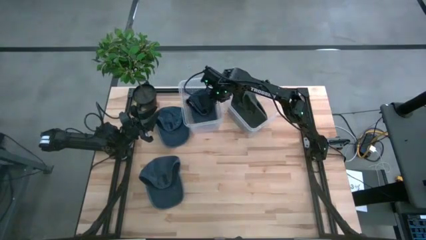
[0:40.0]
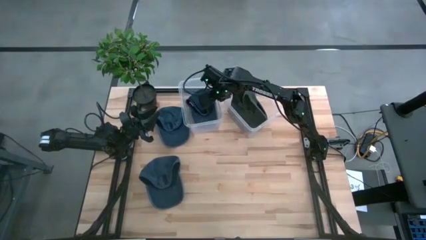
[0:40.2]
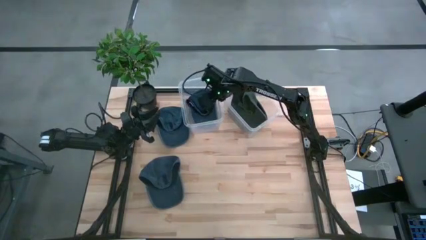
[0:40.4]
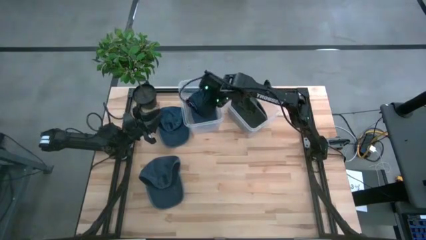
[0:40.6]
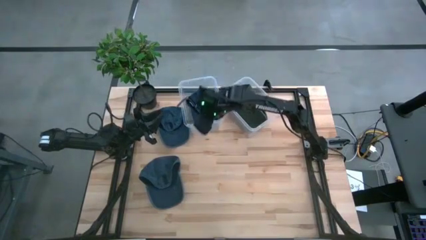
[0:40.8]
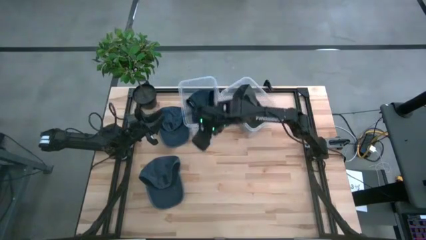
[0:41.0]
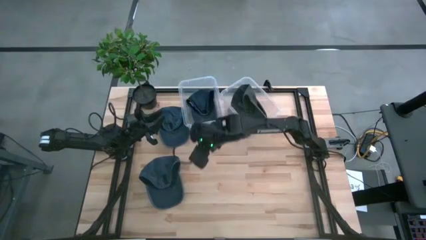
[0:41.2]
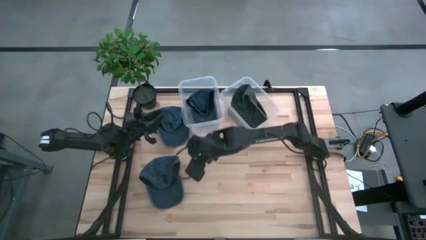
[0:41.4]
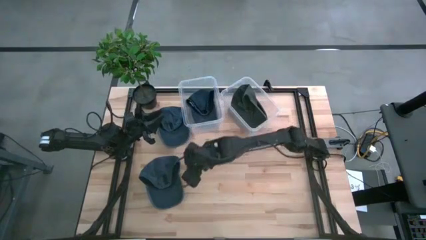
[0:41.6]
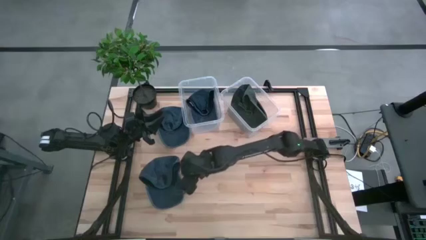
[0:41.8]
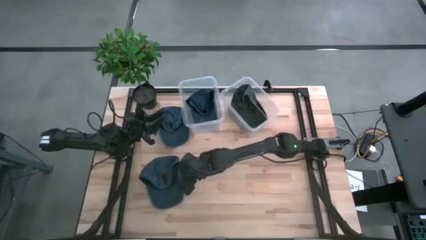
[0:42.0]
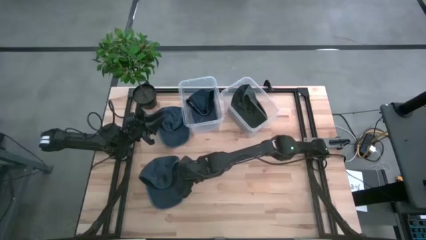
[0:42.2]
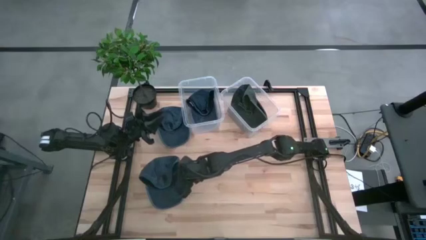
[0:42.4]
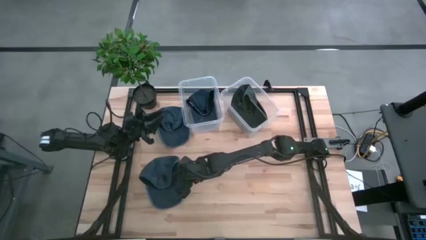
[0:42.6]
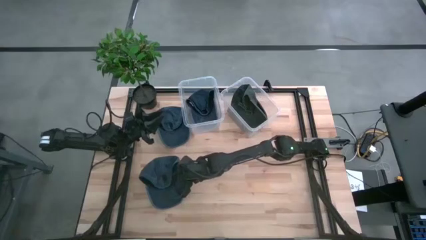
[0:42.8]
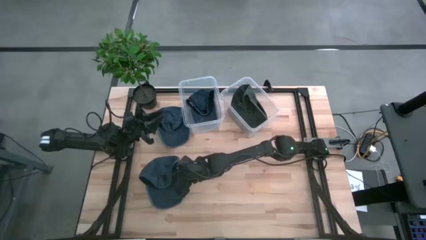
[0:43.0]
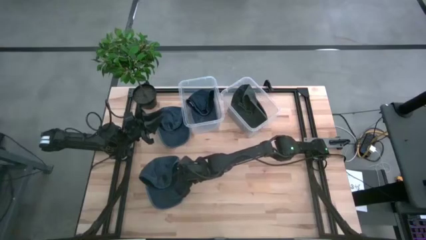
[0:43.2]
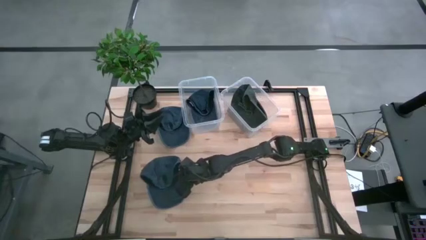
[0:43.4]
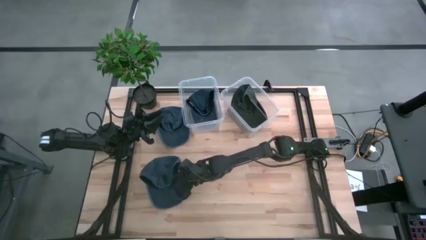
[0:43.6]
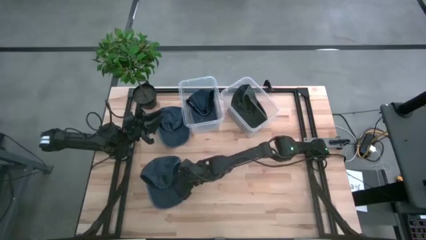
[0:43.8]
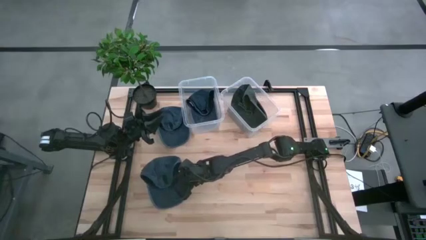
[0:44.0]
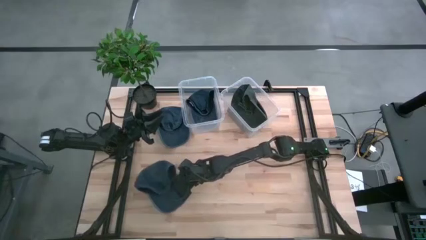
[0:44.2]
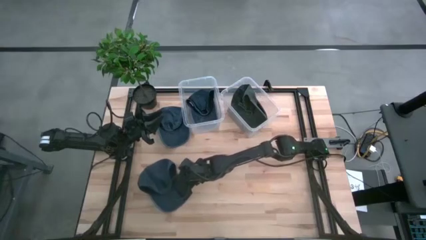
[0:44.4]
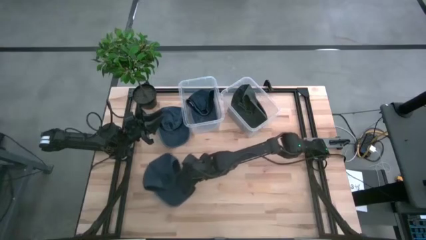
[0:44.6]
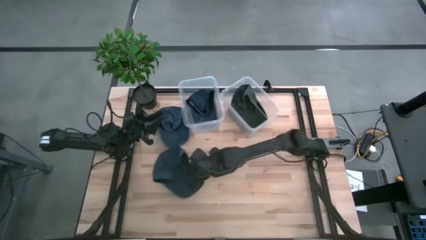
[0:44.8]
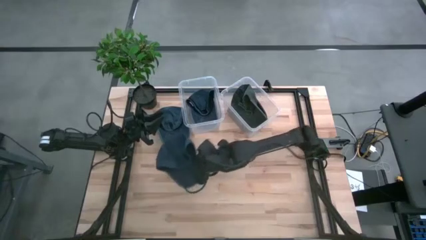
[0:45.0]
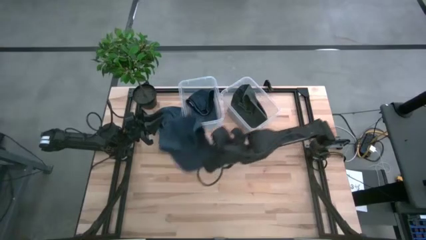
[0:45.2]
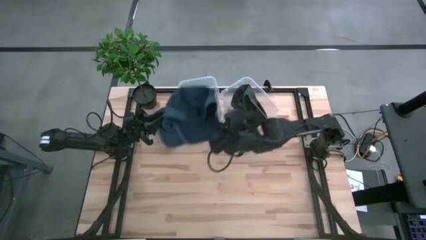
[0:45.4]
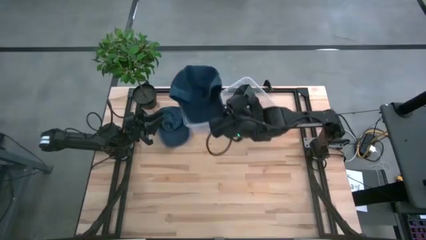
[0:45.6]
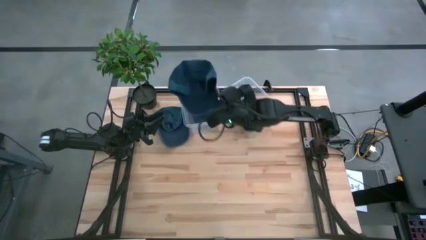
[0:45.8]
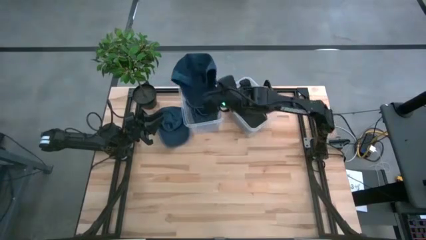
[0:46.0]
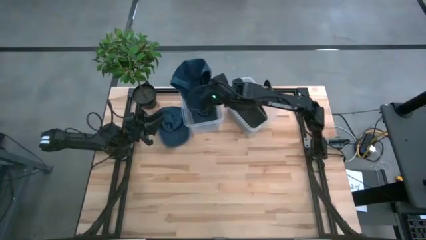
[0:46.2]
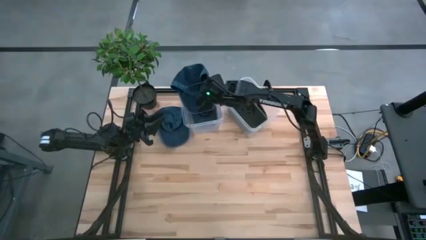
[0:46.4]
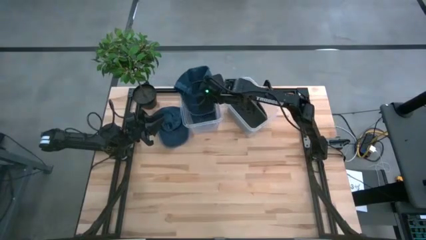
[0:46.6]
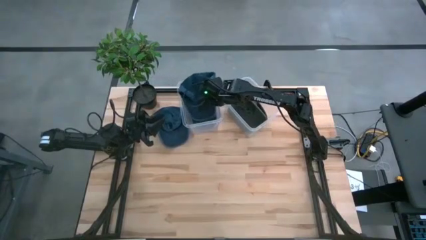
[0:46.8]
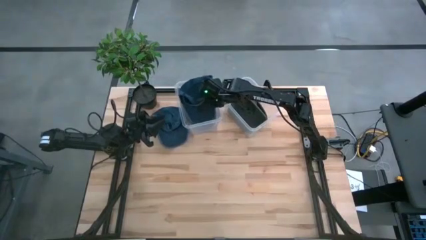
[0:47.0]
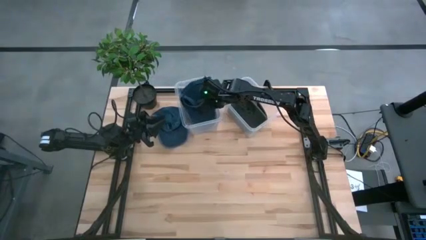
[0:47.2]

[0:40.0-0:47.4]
Task: Pick & Place hat
Put the bottom blue cap into the left transparent bin

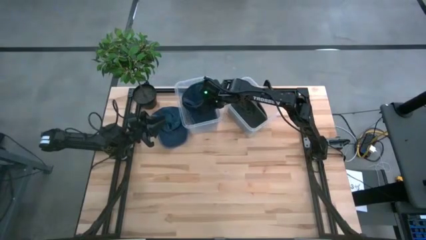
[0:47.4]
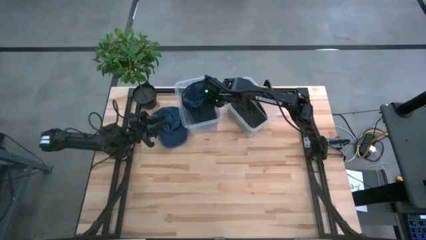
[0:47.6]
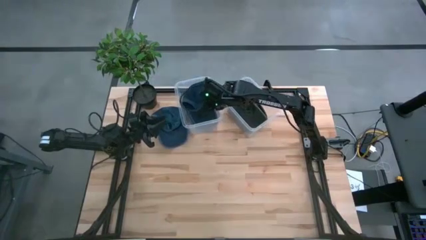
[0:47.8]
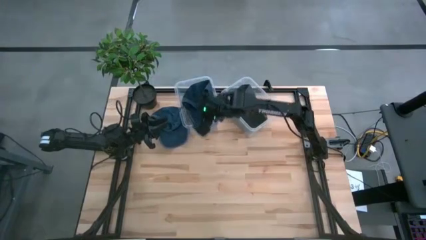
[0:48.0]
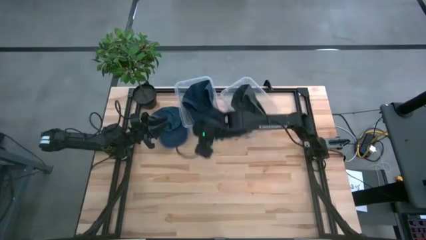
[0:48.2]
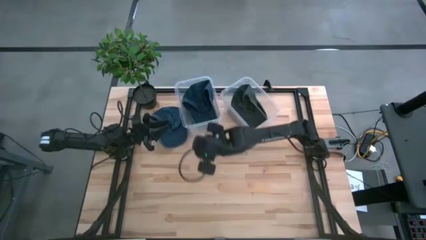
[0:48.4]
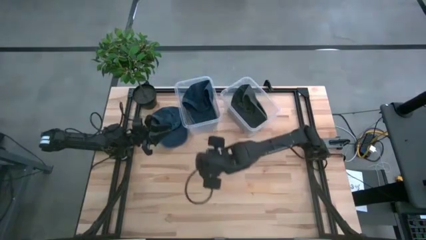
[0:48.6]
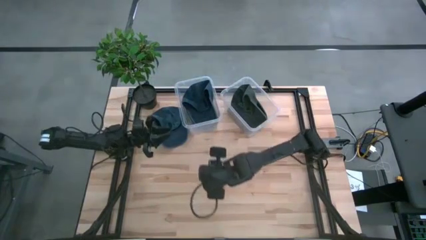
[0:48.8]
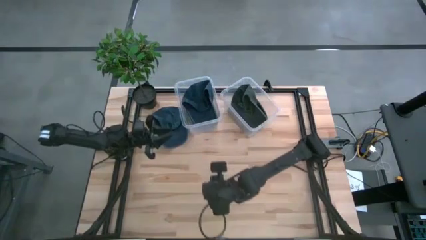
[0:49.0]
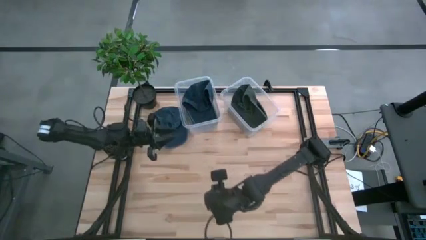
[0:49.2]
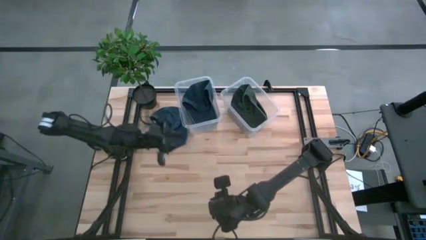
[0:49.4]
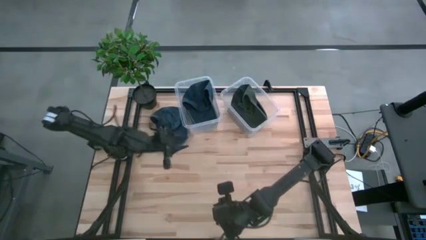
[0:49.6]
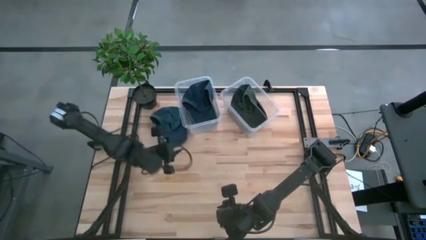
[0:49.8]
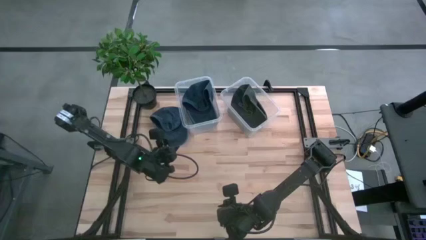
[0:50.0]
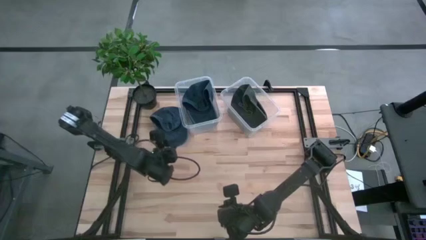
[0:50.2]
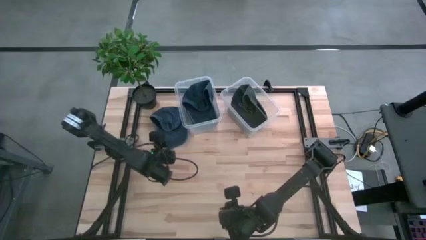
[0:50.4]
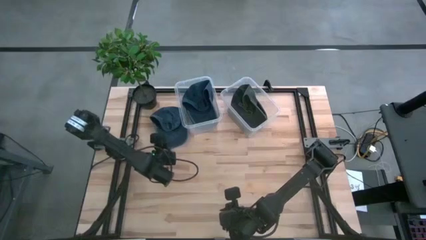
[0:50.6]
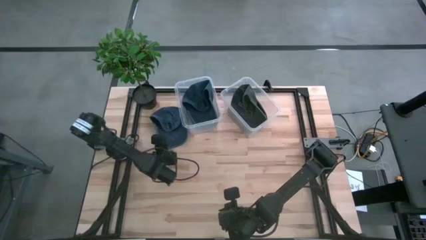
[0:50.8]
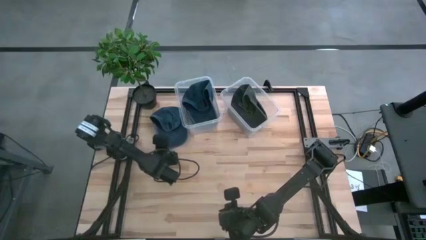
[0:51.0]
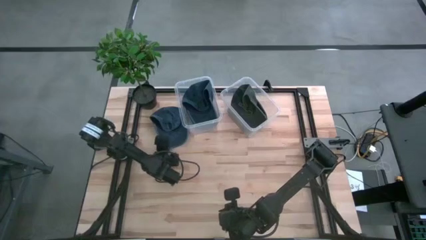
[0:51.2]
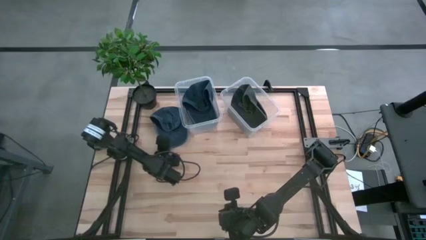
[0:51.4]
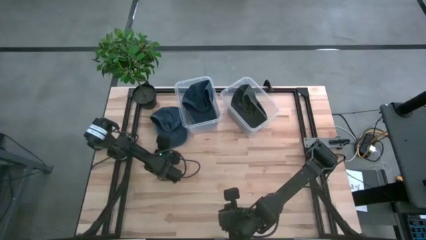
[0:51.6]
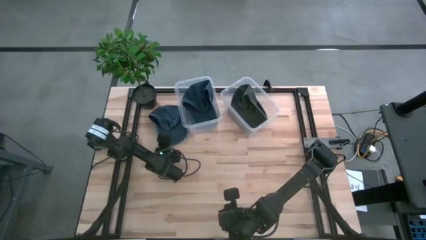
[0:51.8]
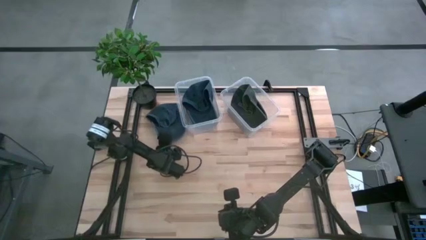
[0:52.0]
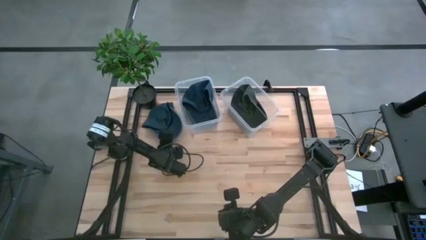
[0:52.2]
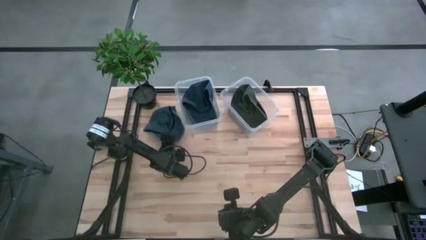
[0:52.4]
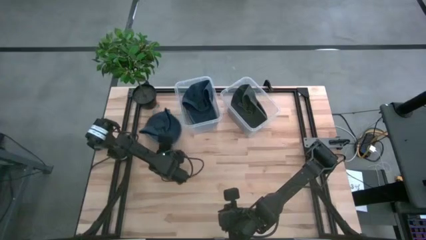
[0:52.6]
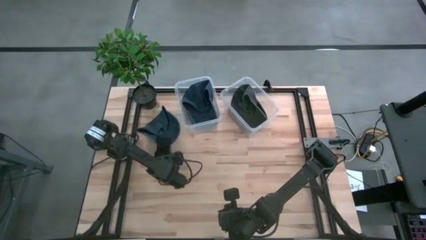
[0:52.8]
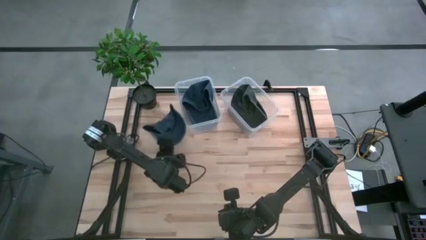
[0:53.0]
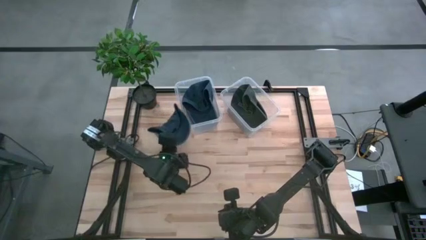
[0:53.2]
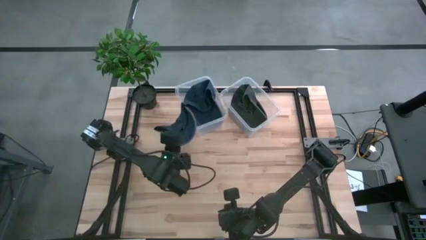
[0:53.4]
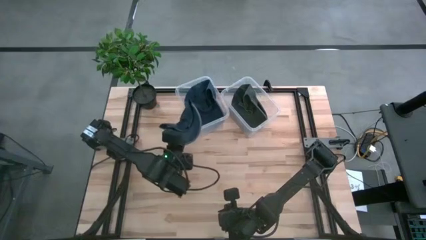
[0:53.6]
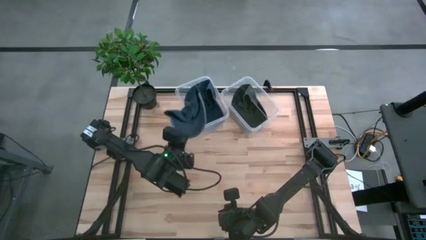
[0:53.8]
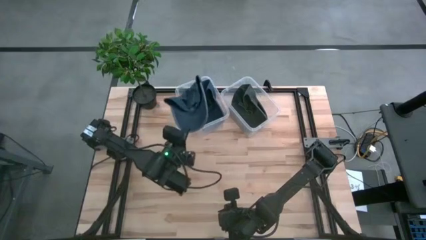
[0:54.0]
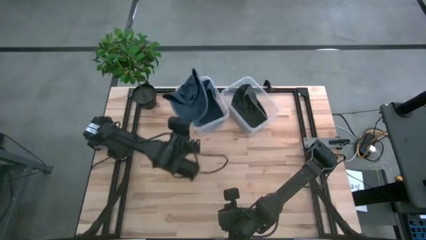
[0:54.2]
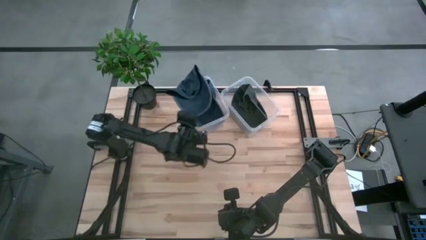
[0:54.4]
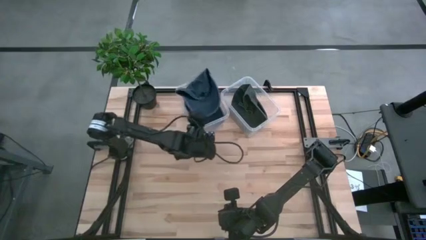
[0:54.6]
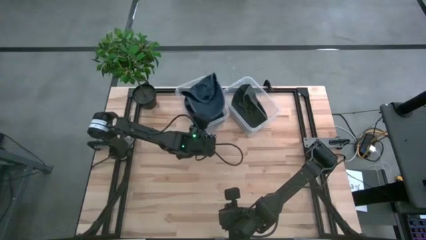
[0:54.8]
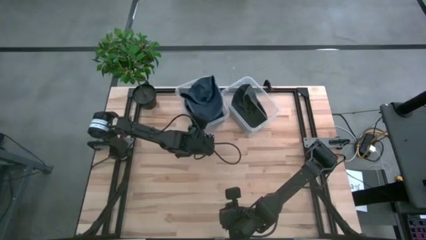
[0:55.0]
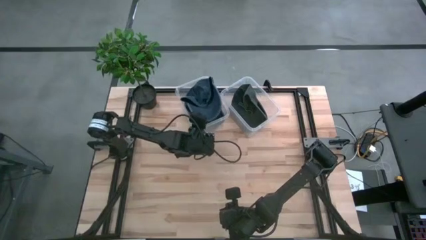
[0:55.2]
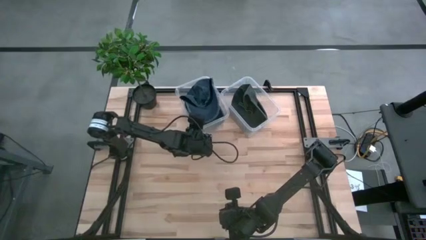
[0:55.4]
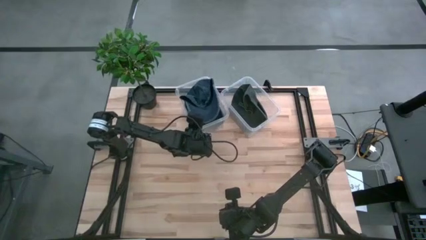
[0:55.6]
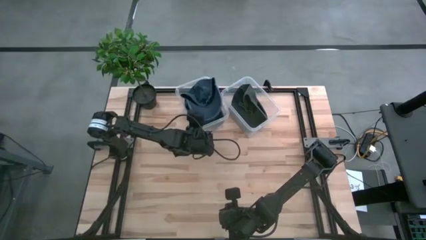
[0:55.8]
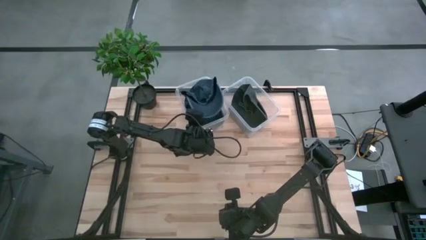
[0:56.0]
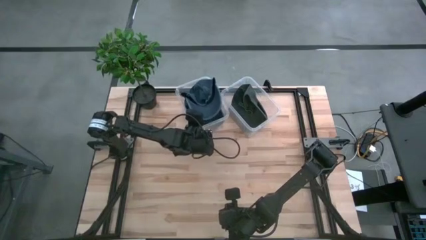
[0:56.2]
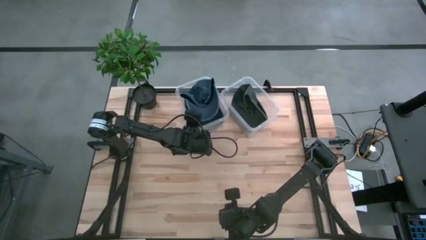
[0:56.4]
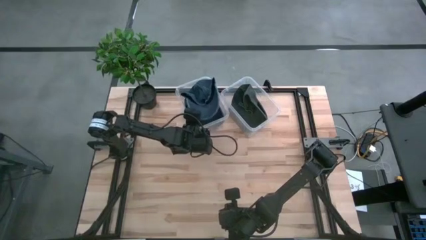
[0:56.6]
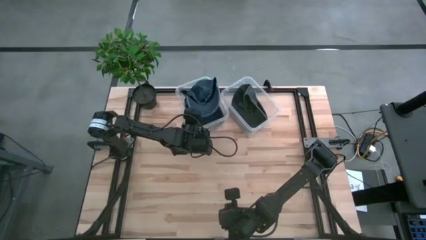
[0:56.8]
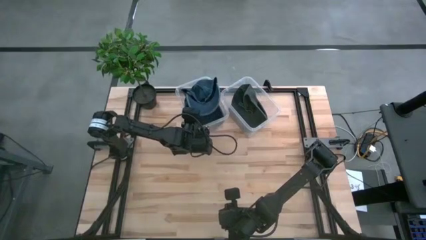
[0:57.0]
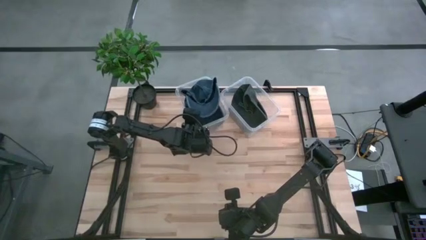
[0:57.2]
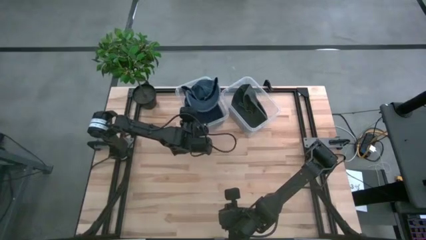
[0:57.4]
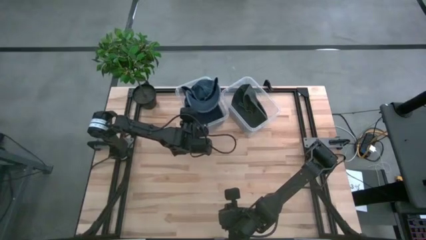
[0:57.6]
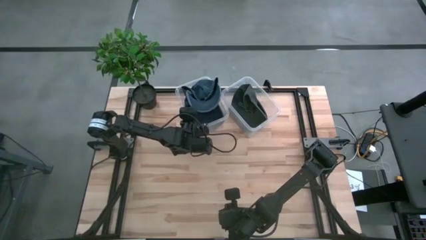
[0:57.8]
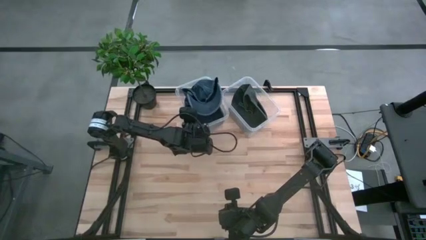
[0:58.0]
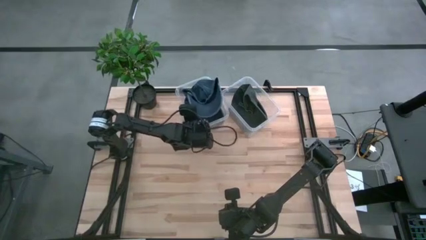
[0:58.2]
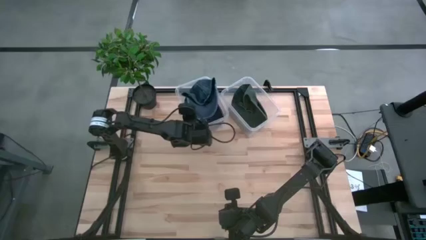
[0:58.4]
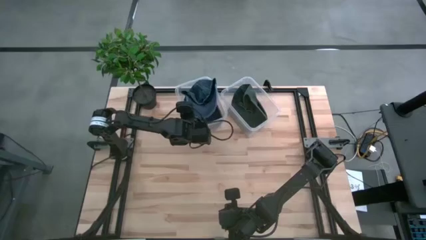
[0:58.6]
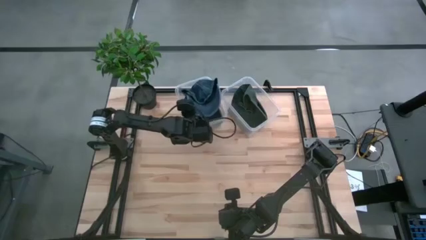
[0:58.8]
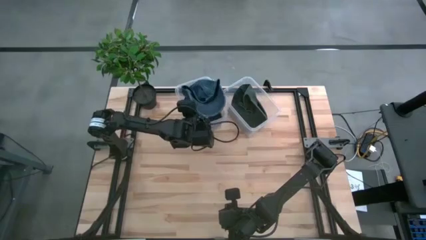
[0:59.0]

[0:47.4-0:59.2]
Put the blue cap into the left transparent bin
